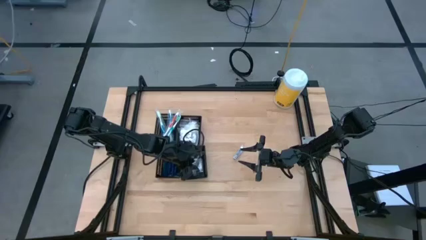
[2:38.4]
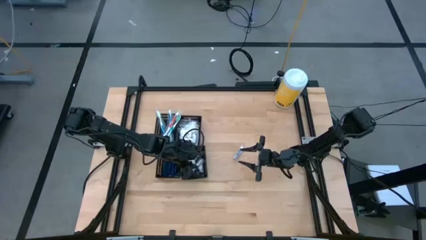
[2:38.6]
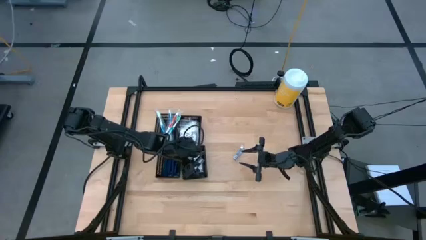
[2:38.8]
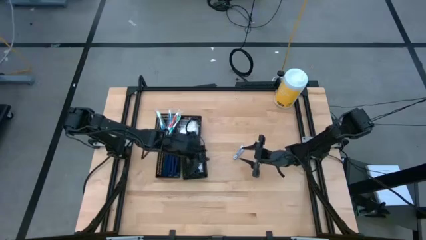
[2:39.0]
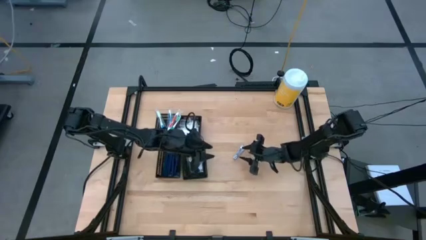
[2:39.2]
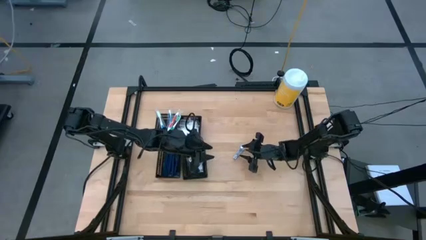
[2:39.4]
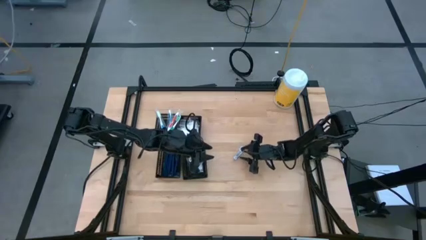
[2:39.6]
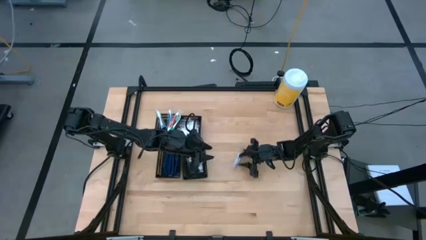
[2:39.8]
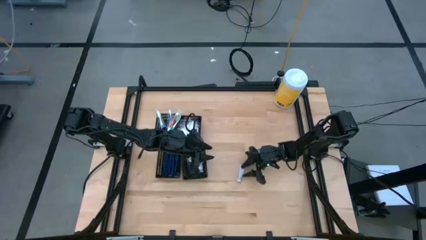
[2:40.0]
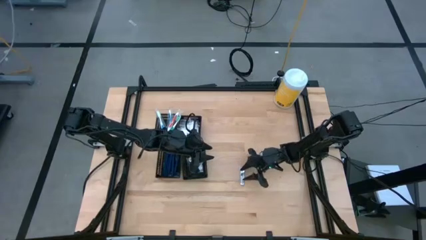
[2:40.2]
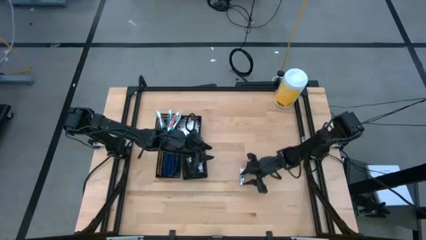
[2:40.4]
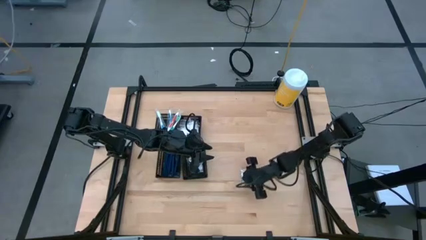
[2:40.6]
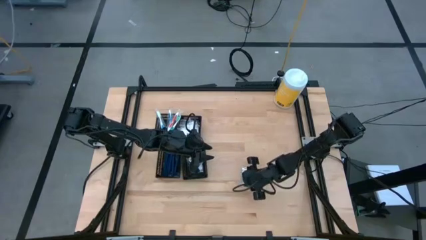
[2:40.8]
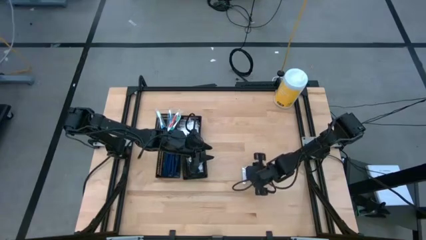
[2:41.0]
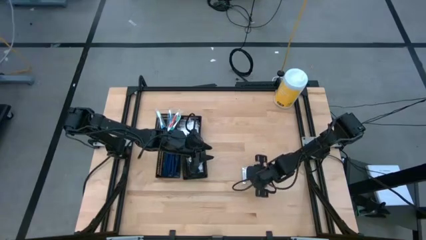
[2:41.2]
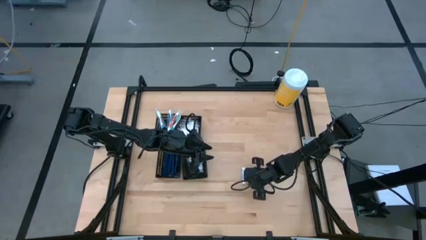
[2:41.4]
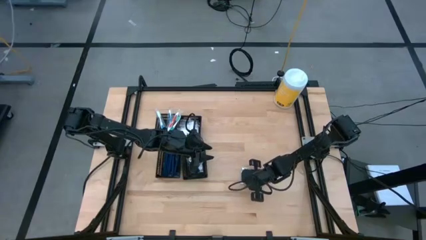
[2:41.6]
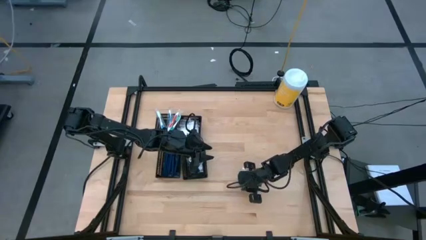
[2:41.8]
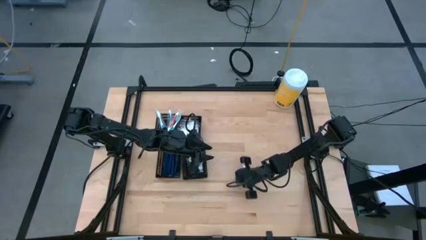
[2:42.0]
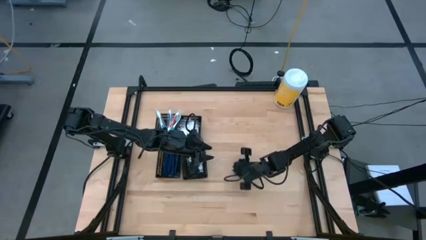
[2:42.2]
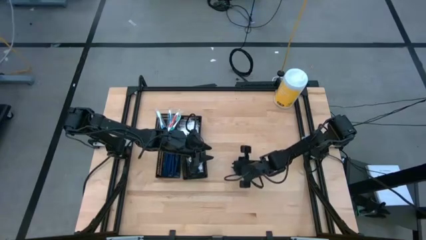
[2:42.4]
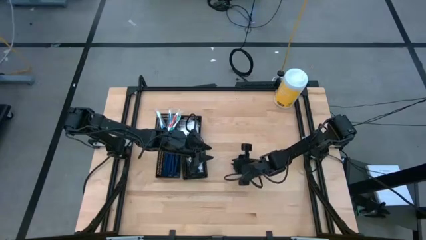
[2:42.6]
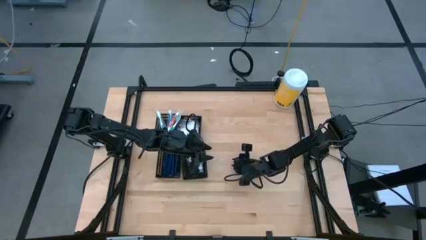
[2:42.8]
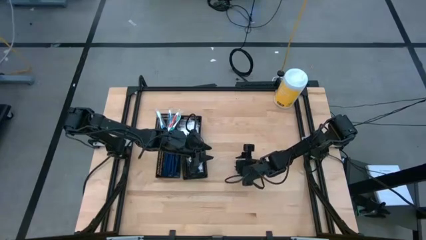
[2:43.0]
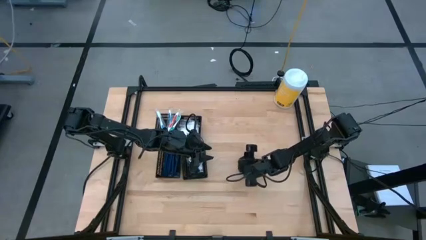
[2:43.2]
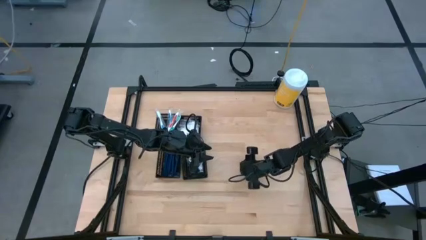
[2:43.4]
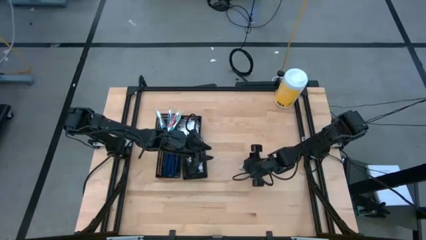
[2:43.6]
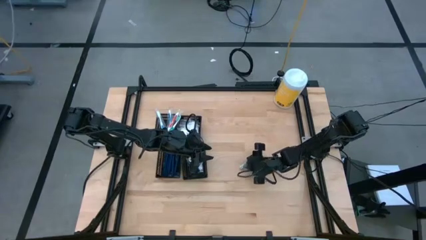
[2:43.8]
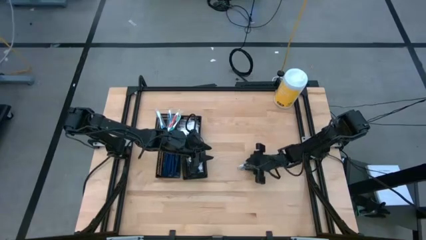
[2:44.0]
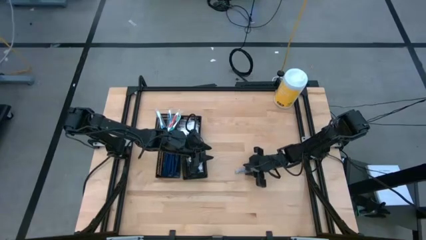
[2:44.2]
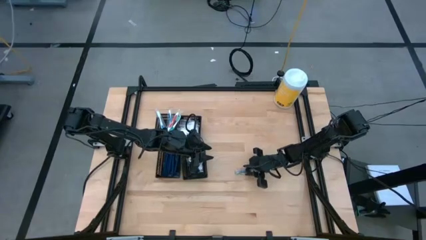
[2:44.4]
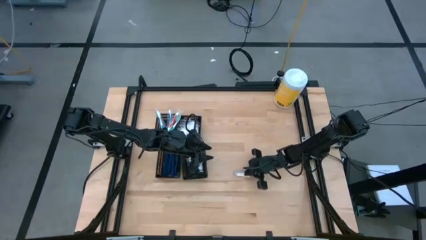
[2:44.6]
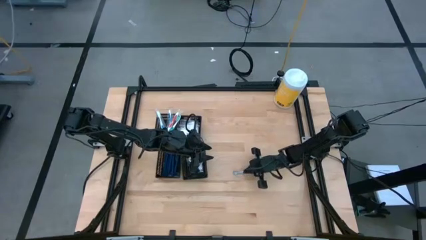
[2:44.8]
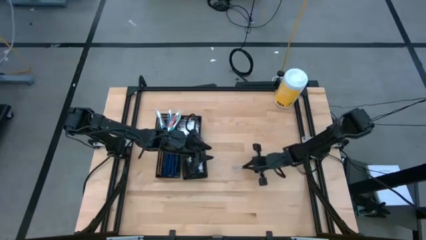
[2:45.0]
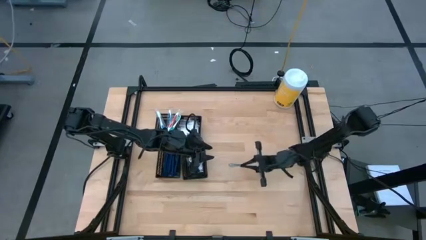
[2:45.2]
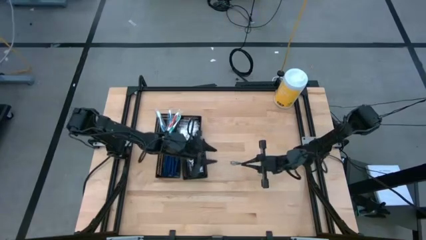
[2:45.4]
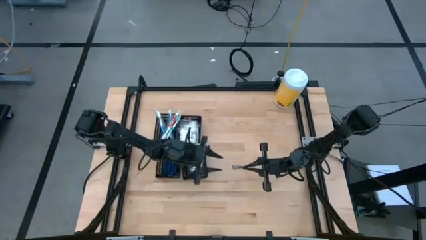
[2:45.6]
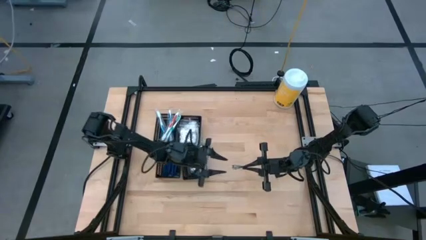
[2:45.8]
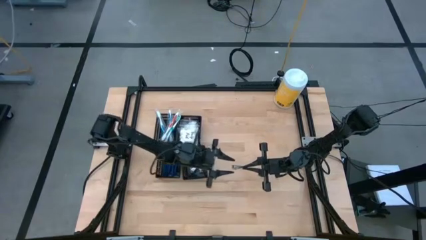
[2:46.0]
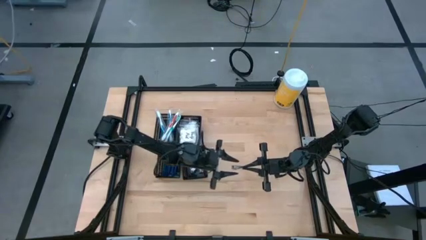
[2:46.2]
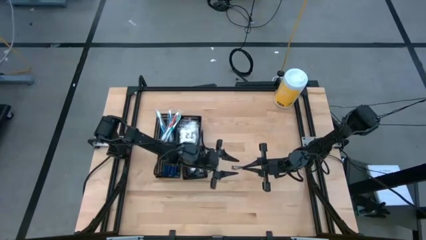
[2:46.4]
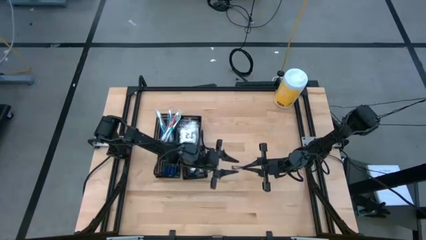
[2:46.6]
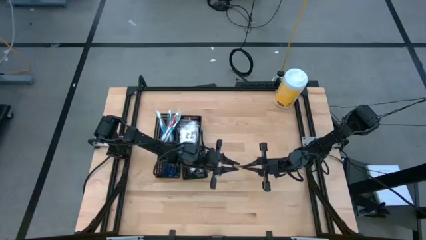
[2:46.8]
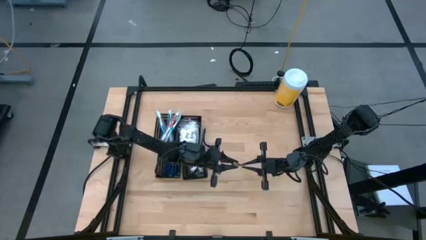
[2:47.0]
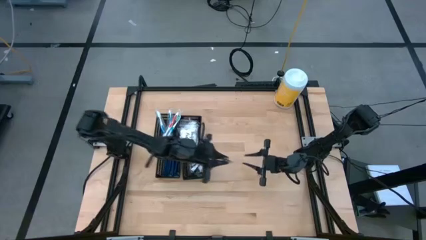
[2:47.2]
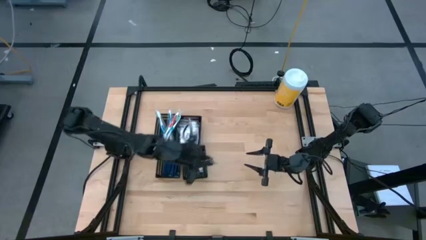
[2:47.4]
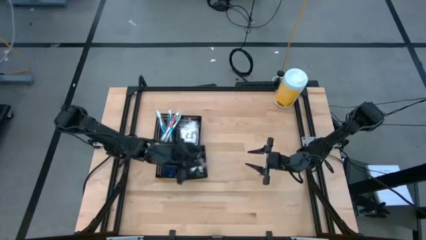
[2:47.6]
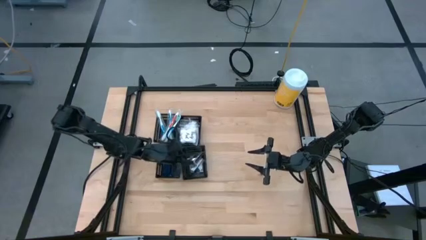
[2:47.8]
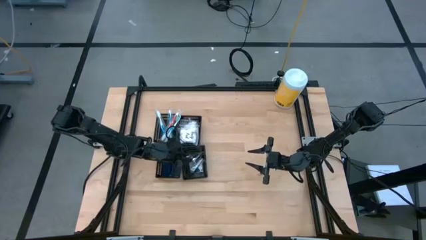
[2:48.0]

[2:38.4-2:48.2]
Task: Pick & Place Travel size toiletries
Put the nail cutter into the bottom right black bin

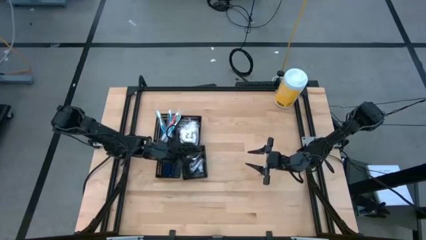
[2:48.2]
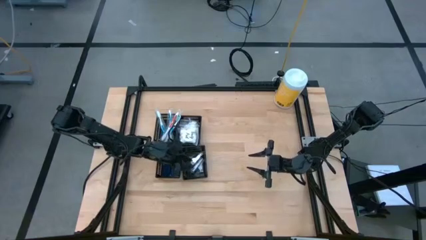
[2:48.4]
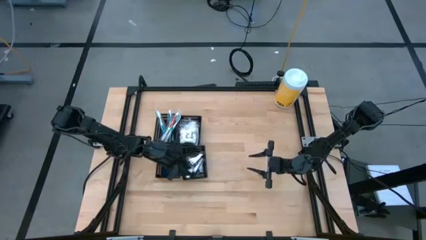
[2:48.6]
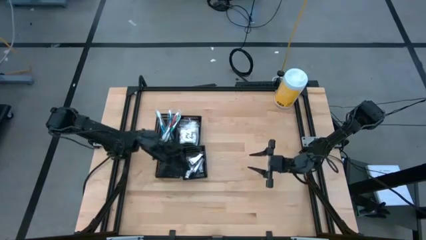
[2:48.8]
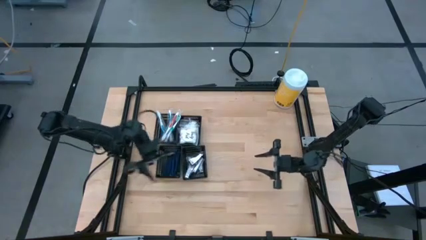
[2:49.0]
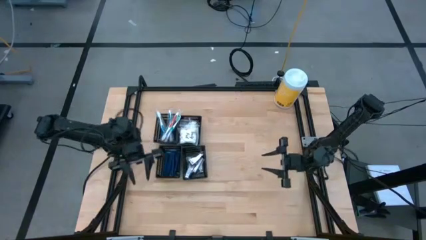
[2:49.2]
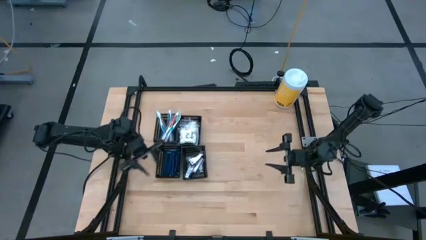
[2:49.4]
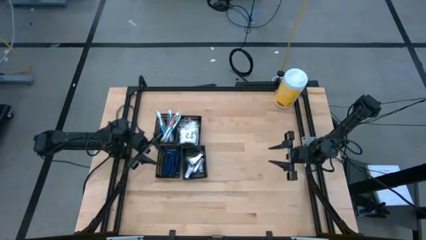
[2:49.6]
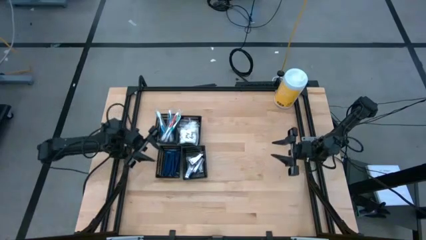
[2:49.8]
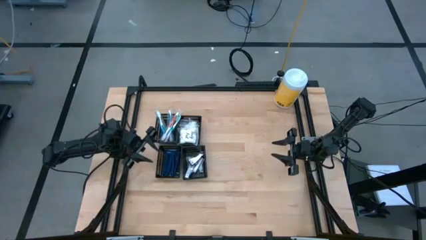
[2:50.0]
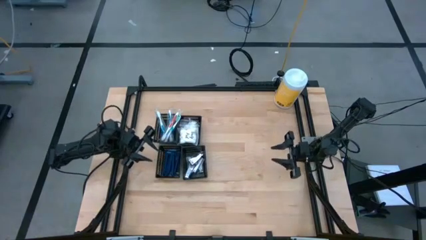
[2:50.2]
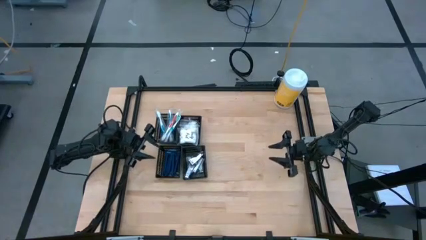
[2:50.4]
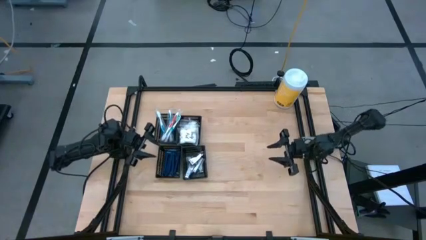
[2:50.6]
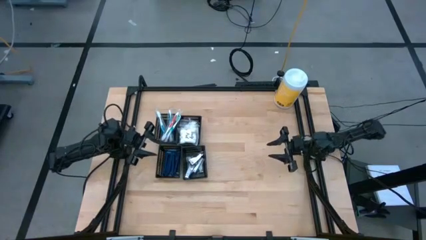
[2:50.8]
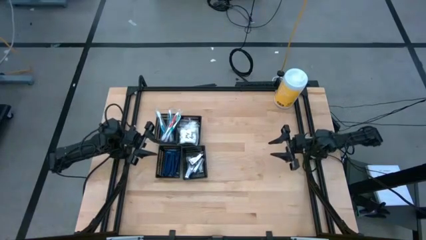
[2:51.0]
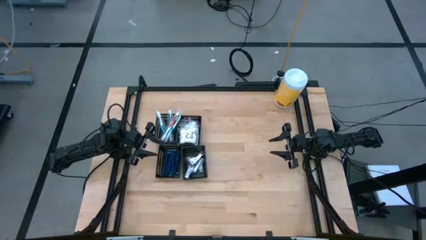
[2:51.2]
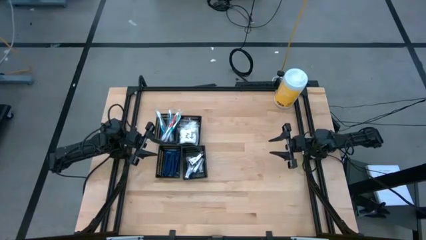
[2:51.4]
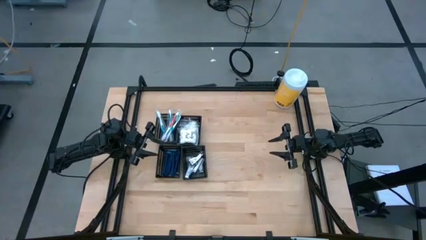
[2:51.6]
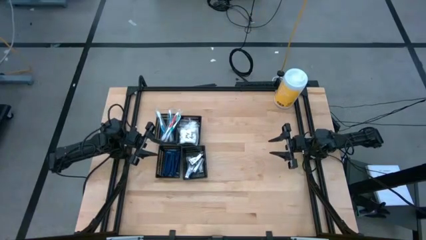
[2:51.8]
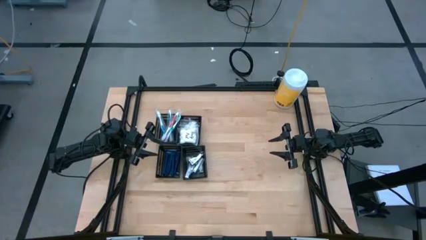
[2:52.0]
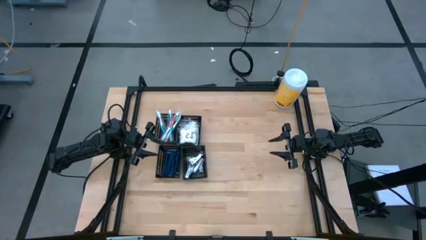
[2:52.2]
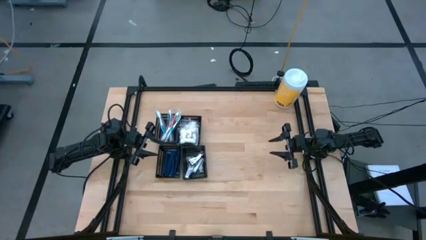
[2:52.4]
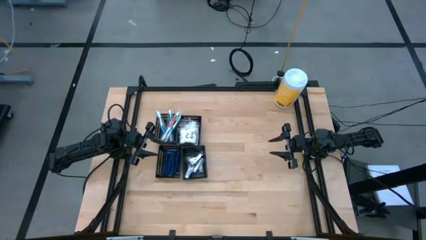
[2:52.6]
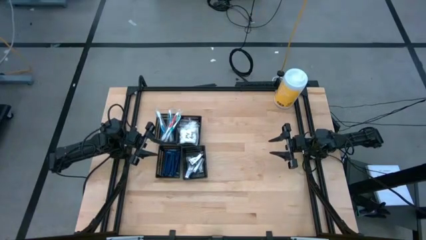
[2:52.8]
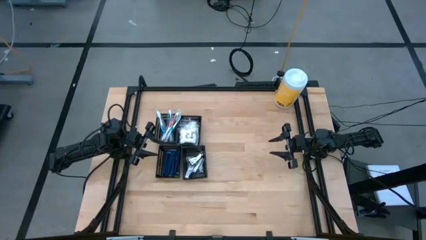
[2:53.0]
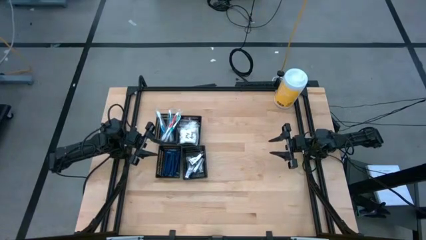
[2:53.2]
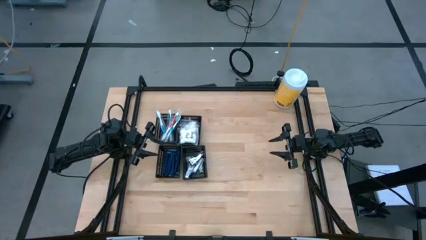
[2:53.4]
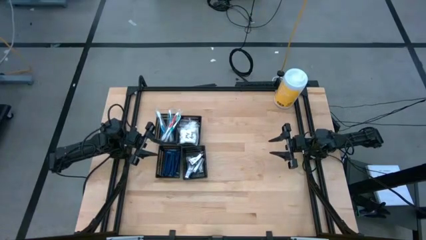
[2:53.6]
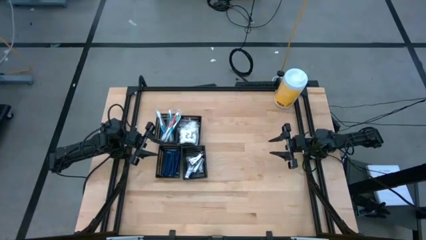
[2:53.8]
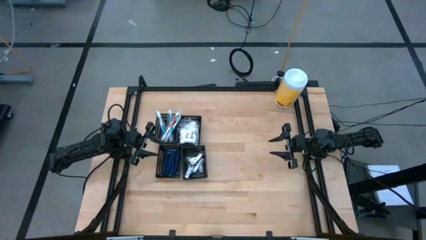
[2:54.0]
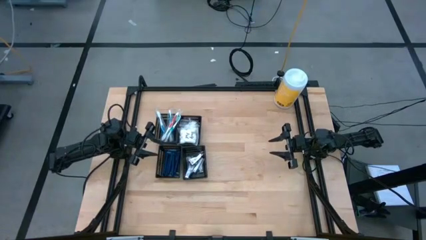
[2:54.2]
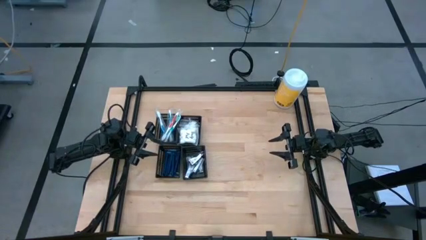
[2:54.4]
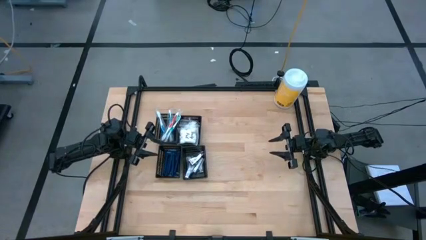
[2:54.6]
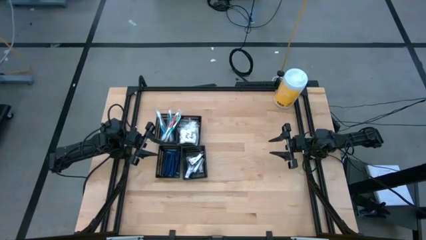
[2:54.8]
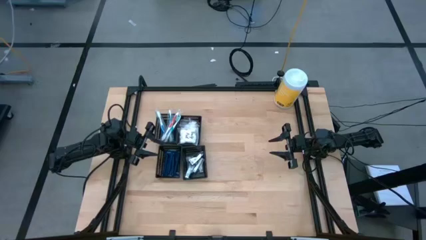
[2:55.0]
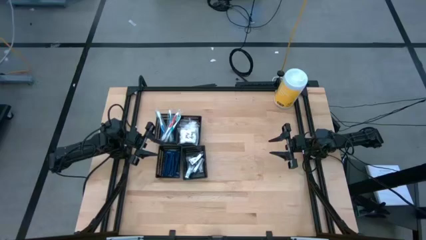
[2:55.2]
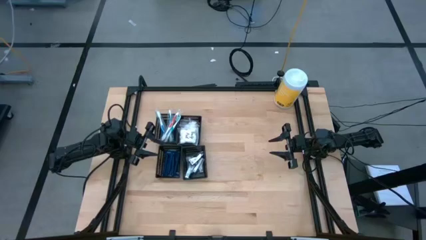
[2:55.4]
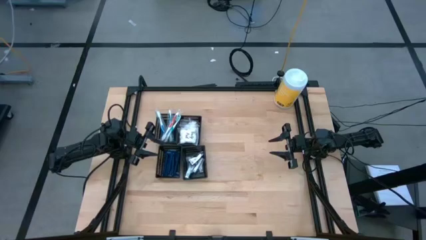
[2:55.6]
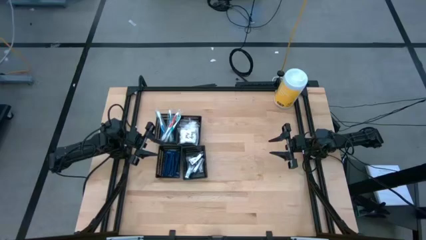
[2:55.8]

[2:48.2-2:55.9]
Return to Home Position
